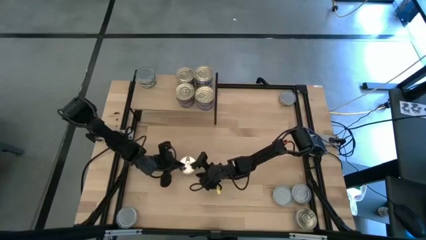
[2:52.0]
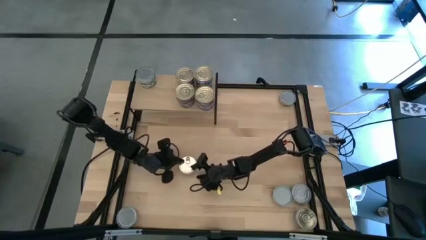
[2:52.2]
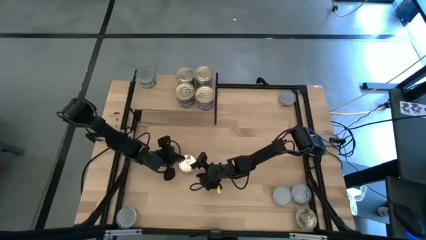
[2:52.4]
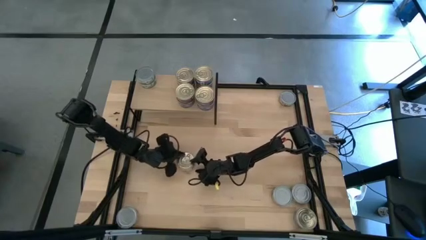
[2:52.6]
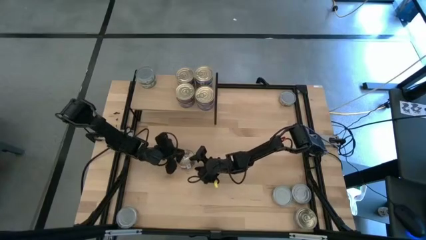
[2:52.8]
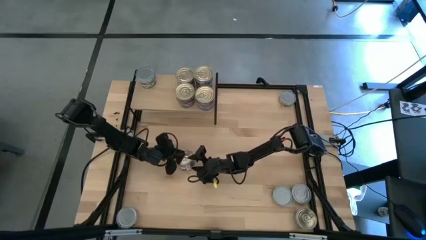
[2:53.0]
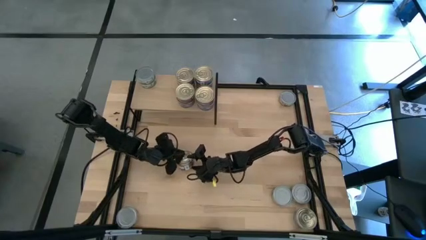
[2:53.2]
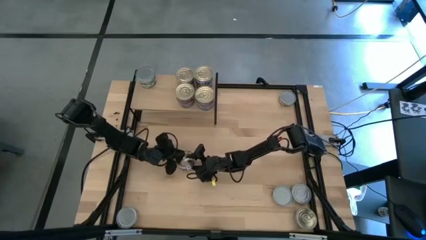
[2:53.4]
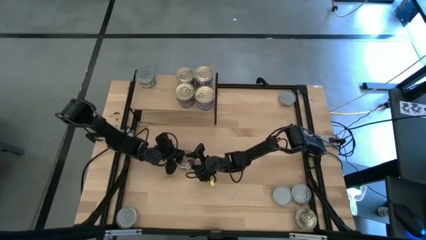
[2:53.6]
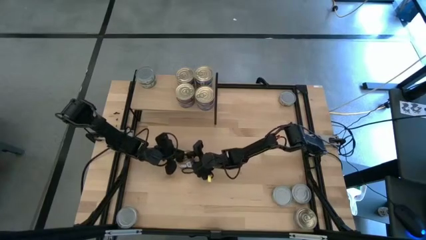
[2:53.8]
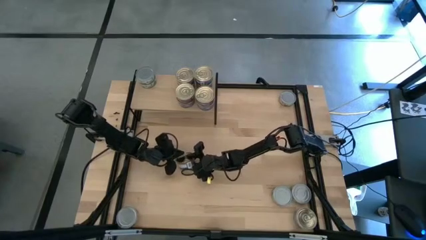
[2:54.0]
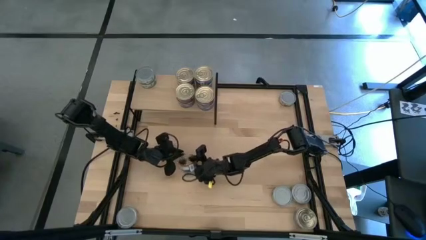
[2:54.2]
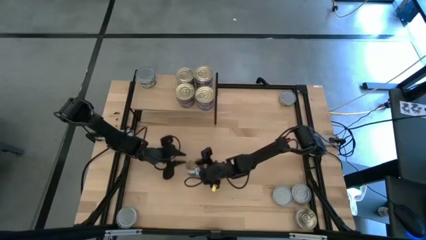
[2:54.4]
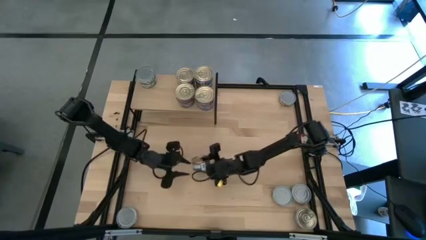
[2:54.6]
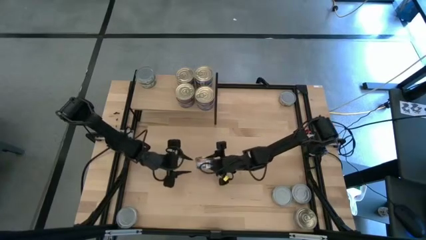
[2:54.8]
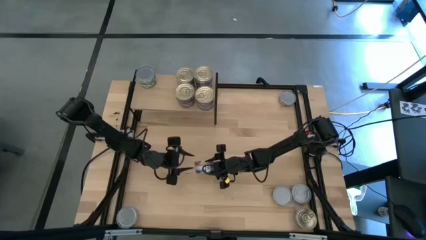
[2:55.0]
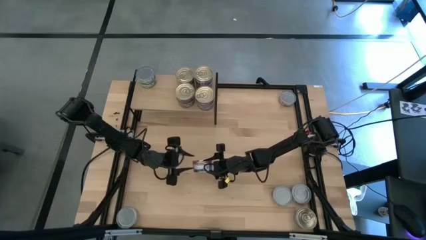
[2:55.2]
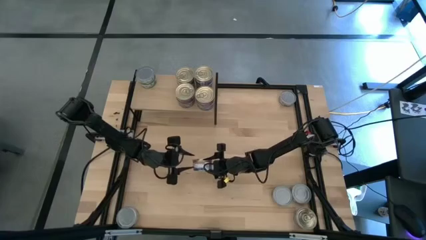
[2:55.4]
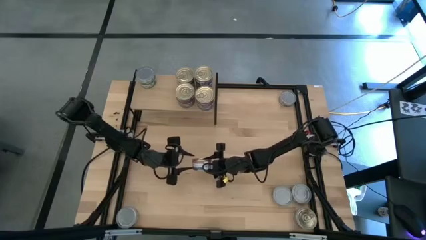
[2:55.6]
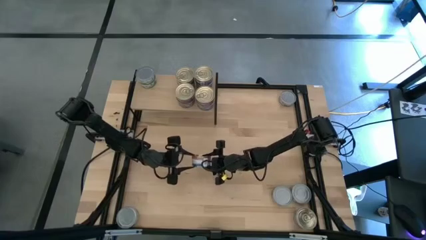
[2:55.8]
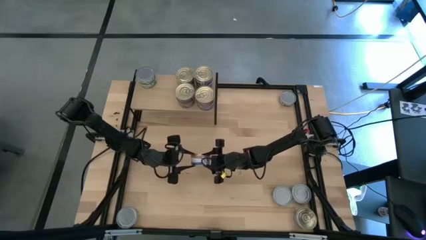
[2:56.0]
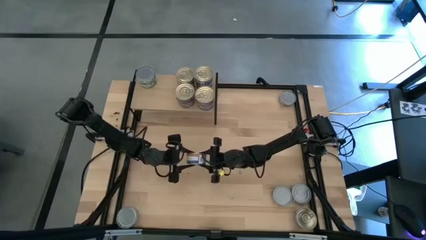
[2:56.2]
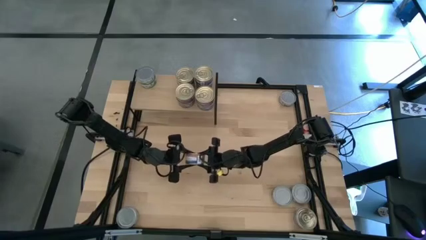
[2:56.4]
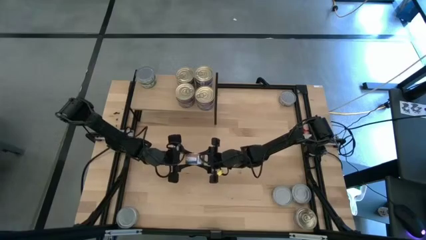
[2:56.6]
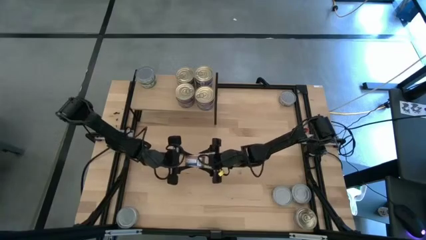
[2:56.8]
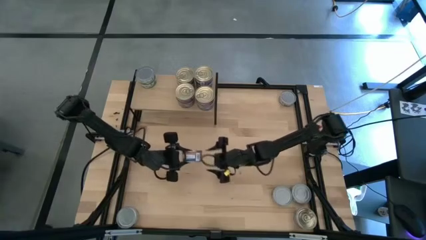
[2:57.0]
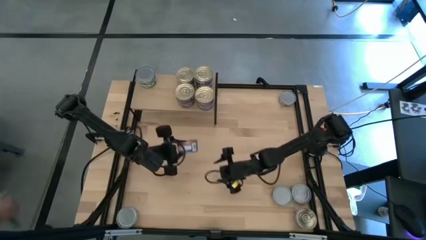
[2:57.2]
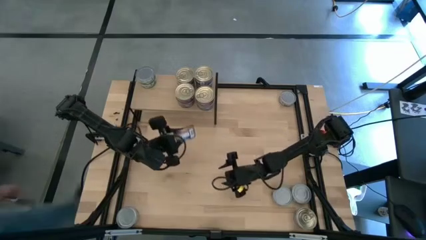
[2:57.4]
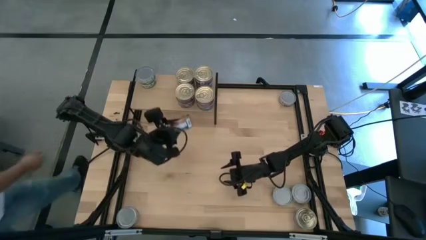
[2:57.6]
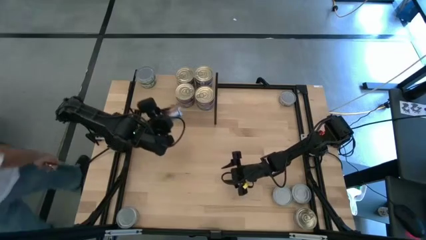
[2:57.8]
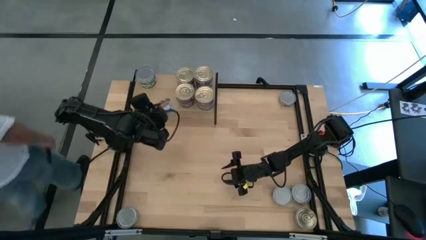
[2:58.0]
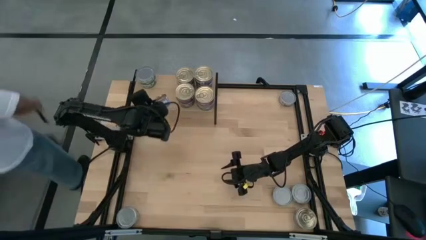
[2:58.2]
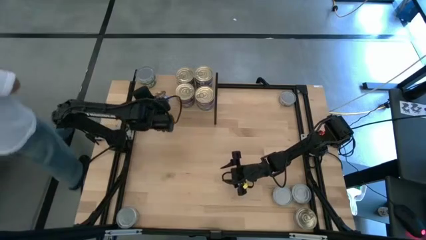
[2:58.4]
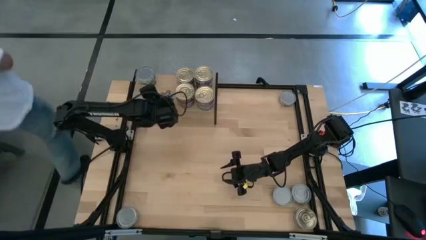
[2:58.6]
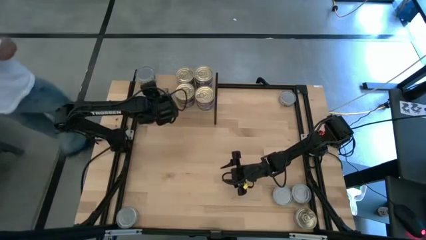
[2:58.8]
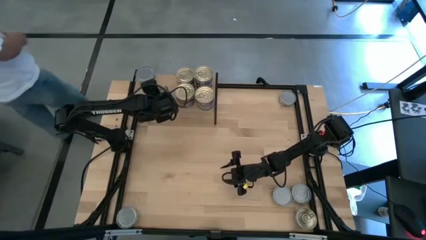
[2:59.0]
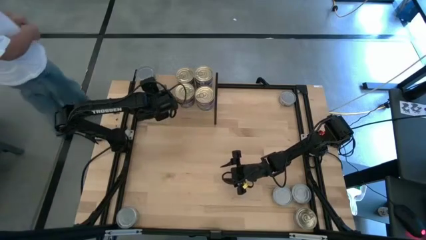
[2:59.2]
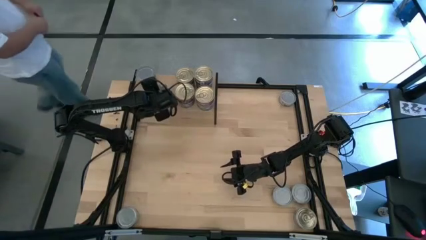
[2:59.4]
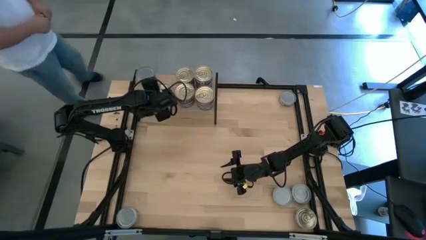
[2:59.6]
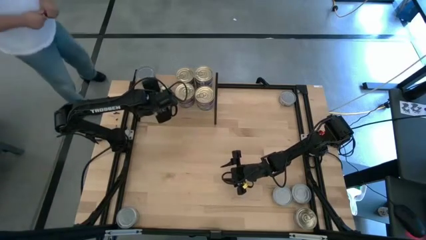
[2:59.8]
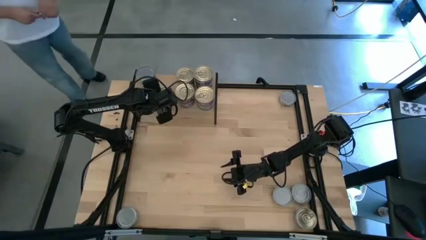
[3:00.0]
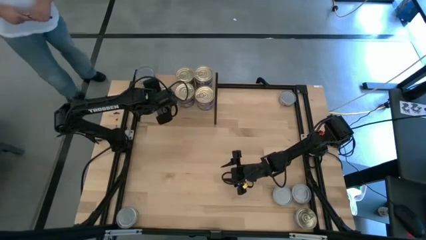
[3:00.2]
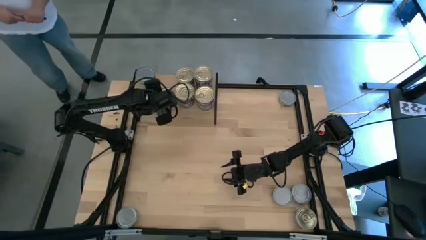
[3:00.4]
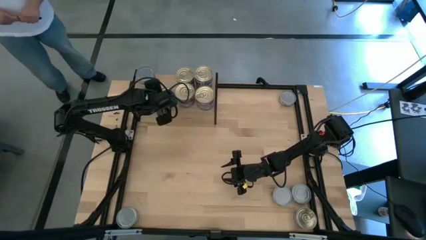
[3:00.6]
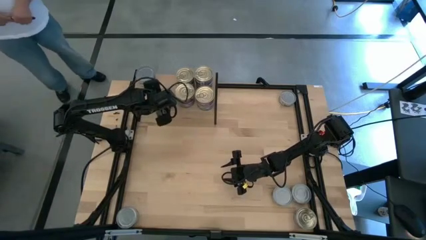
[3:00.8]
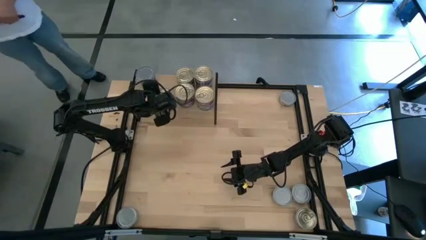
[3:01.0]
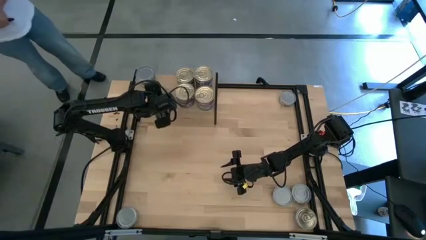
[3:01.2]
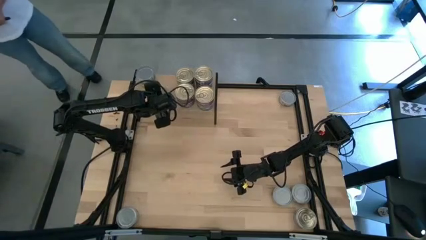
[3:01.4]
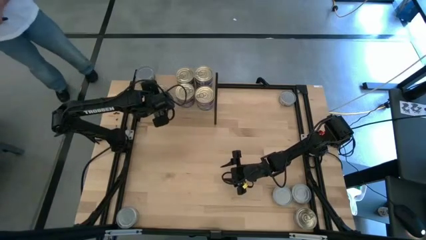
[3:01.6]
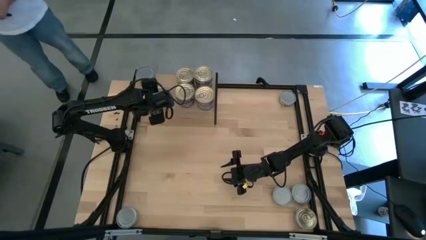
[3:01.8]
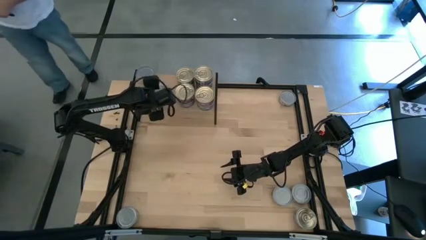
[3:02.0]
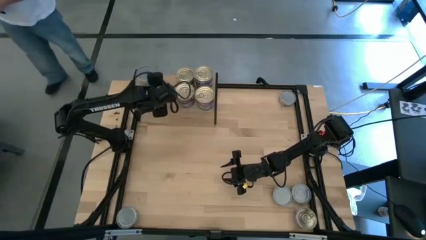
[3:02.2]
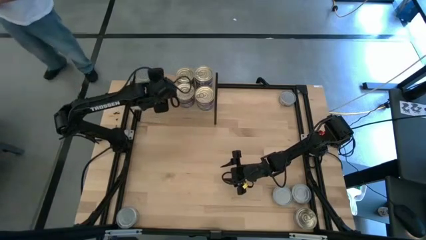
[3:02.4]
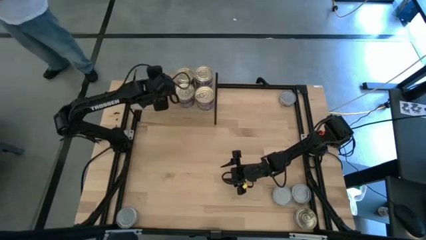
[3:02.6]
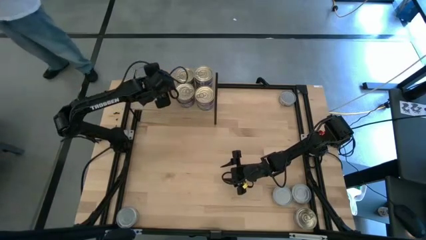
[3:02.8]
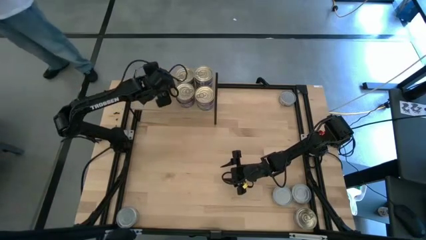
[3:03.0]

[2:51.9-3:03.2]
Task: Stack canned seafood by type on shelf
Put the blue tuna can on the shelf

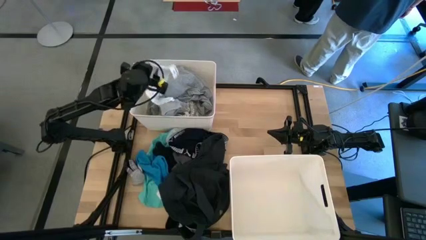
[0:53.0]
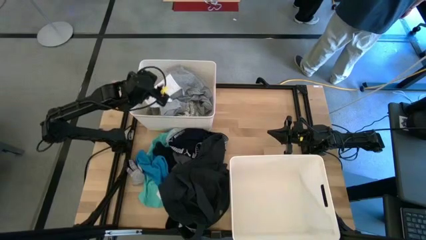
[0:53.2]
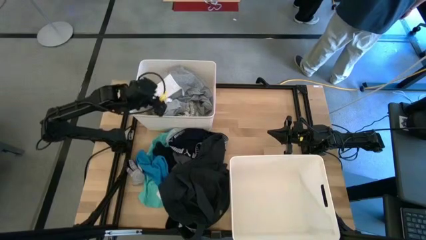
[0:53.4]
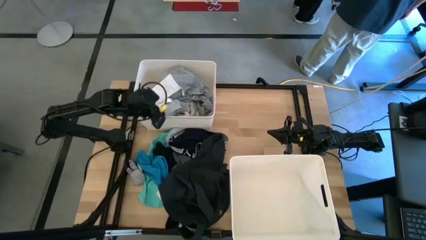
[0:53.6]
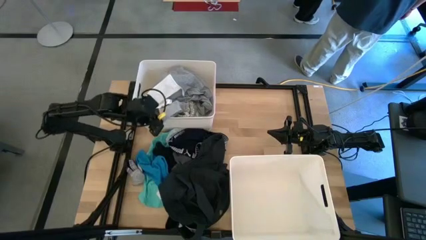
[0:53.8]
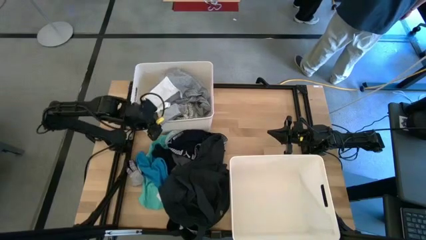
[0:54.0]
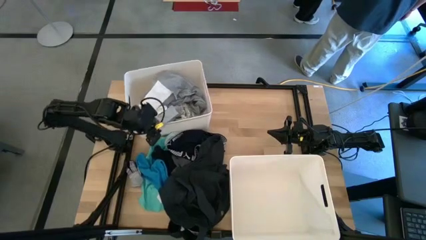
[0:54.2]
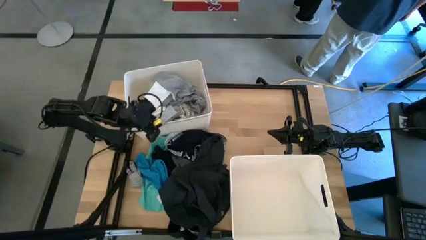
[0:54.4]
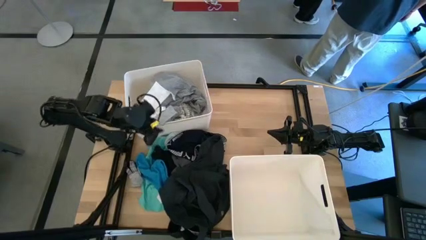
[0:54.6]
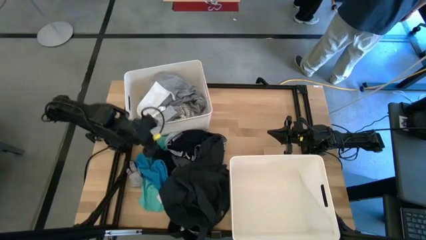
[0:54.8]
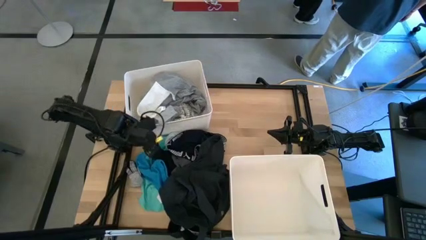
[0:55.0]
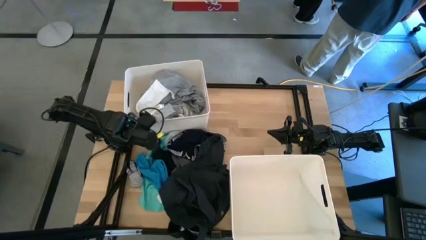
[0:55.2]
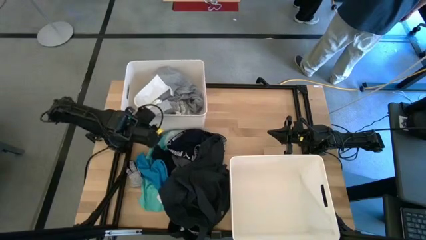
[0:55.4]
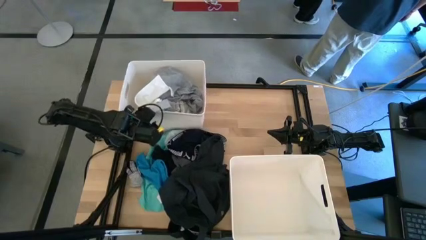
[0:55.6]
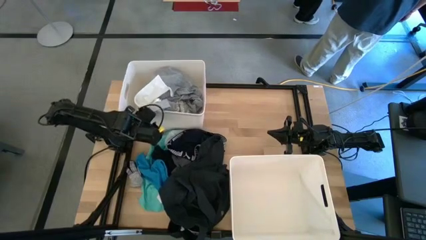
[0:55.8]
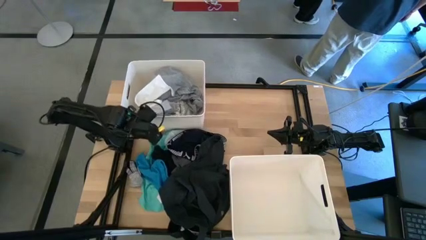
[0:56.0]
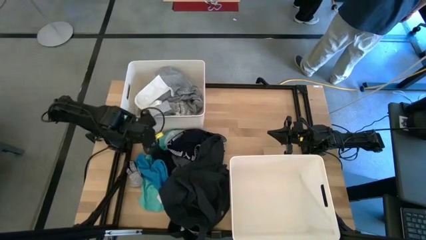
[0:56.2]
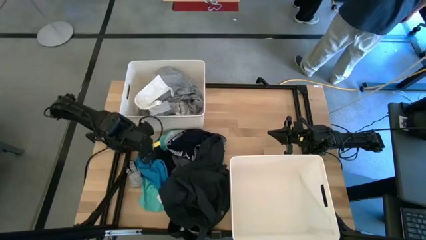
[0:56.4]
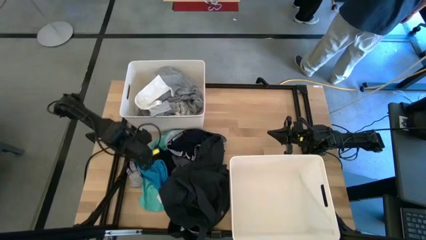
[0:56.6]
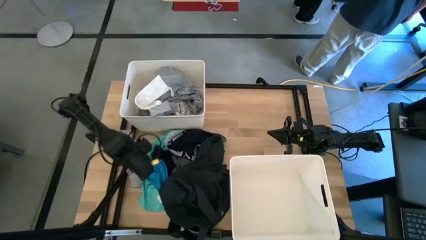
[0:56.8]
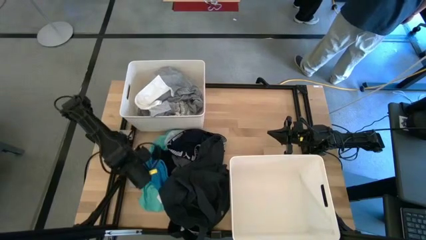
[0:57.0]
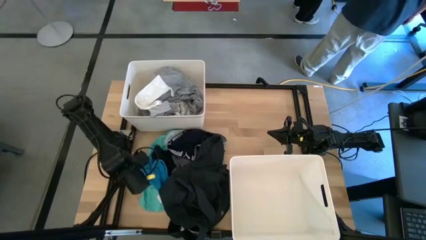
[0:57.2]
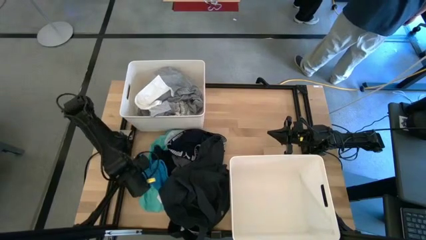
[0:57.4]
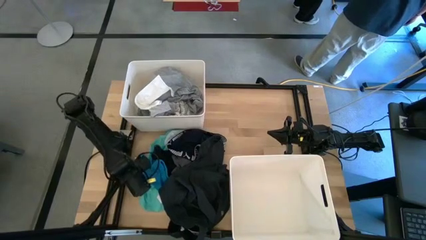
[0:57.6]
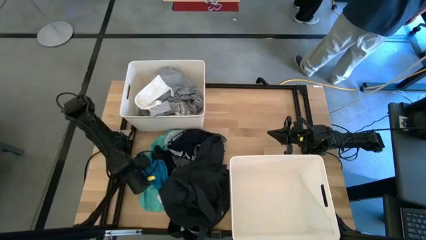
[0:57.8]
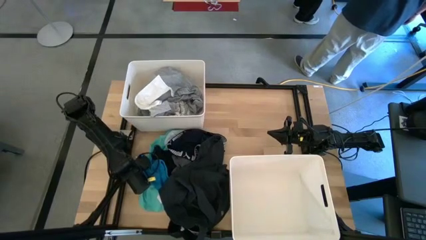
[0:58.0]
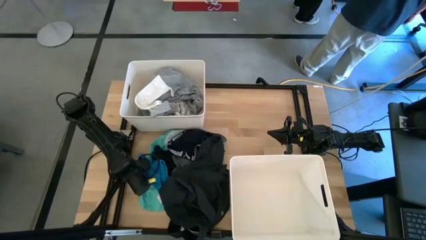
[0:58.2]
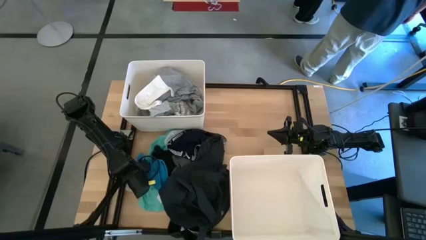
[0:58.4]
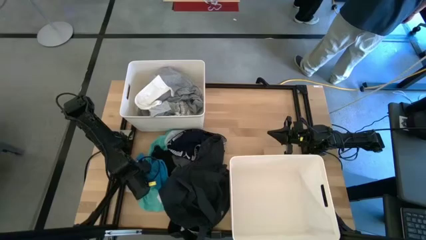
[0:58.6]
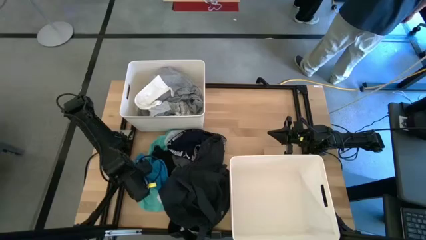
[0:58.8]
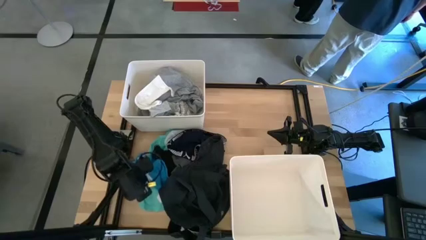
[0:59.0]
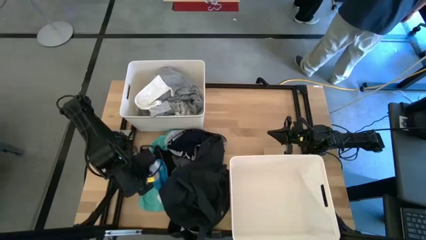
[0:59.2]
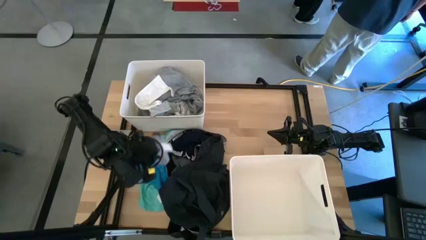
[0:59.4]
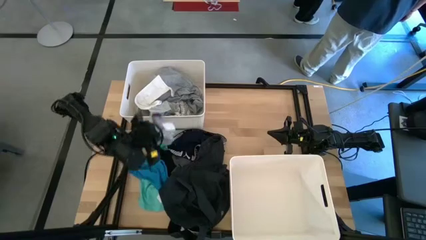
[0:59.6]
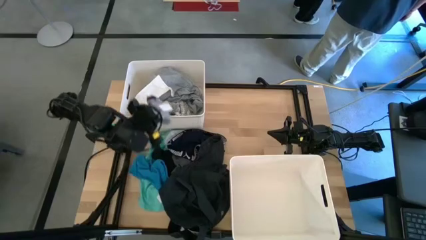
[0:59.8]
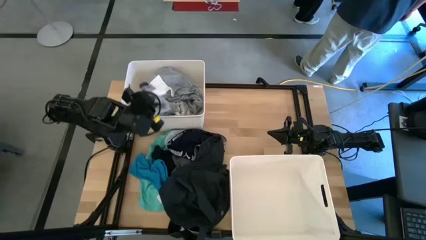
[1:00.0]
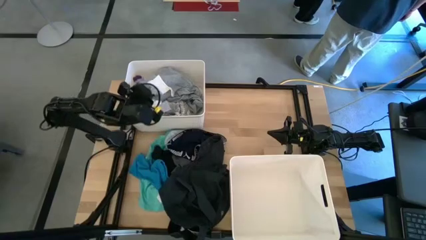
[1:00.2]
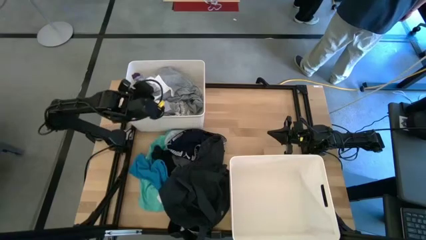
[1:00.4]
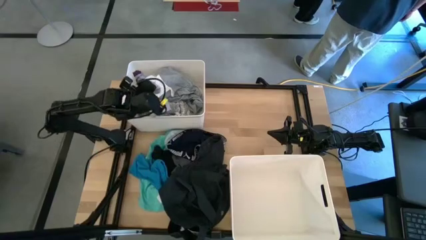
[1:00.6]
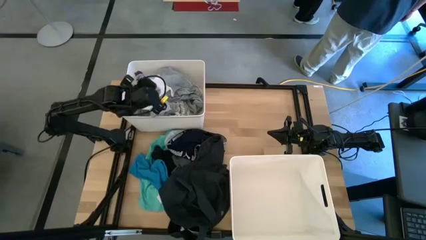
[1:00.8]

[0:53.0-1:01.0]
Task: Sort clothes
Put the gray socks into the top left laundry bin
